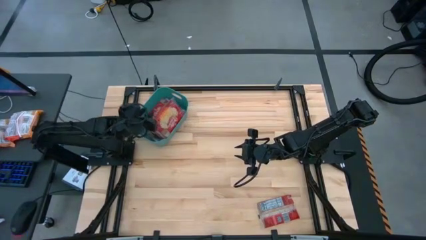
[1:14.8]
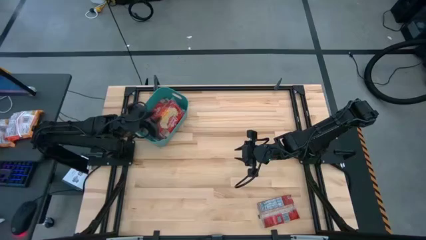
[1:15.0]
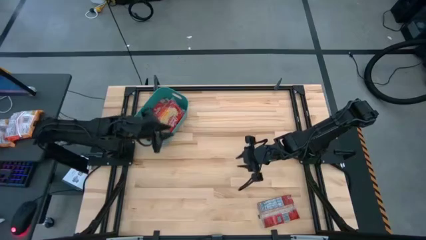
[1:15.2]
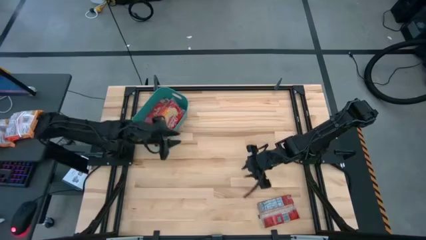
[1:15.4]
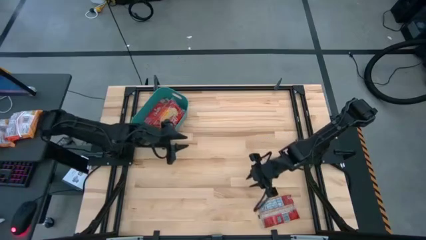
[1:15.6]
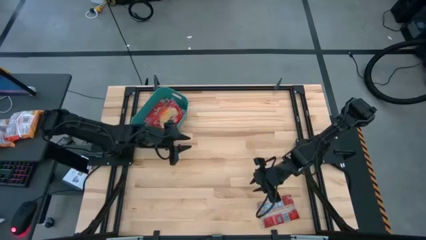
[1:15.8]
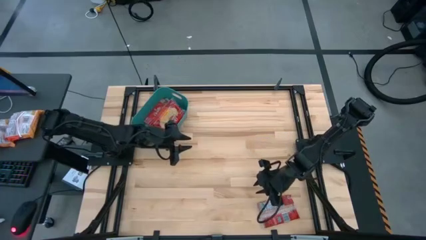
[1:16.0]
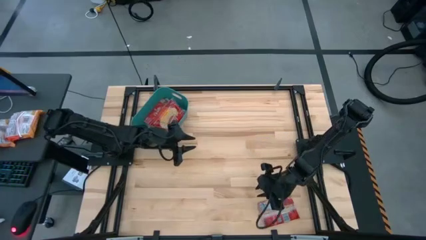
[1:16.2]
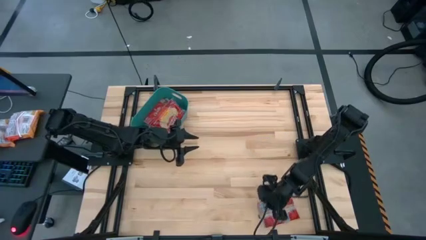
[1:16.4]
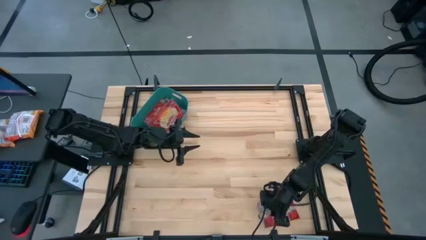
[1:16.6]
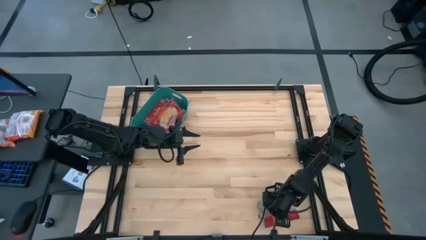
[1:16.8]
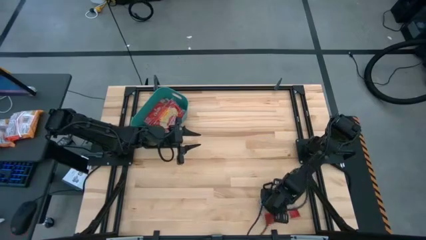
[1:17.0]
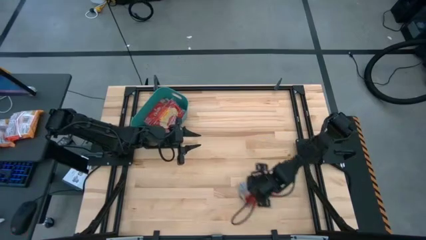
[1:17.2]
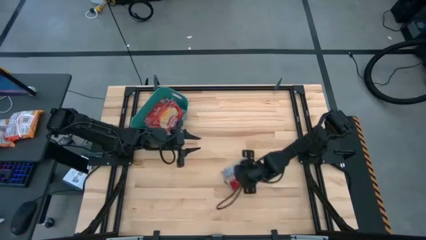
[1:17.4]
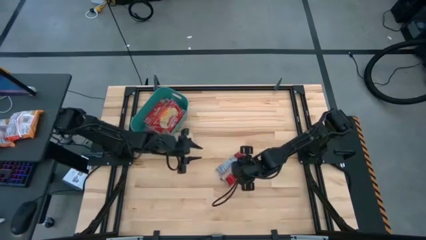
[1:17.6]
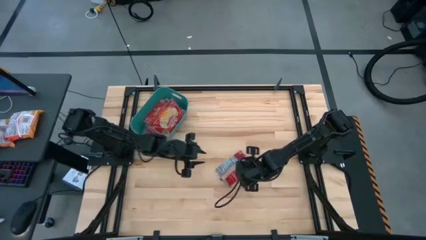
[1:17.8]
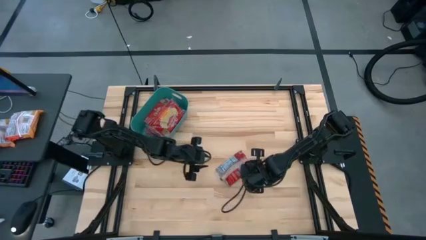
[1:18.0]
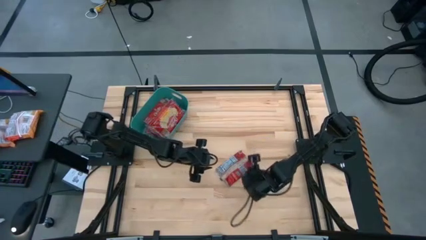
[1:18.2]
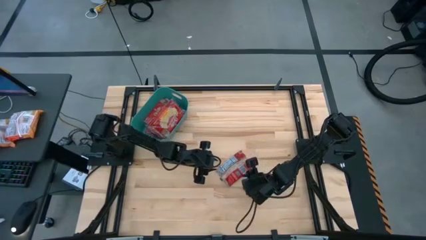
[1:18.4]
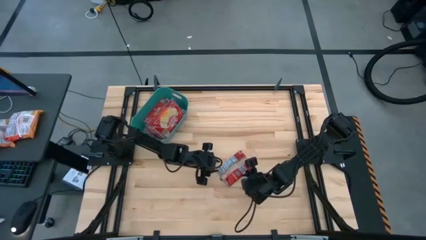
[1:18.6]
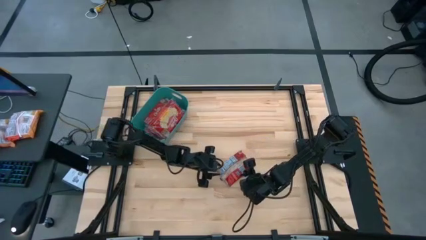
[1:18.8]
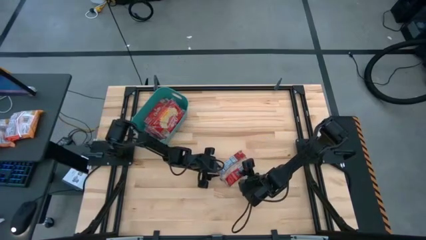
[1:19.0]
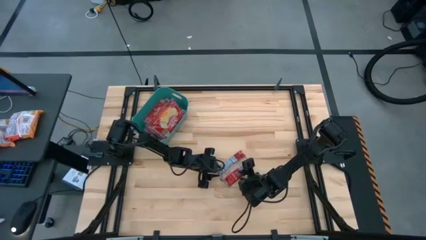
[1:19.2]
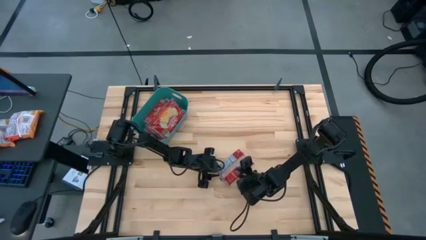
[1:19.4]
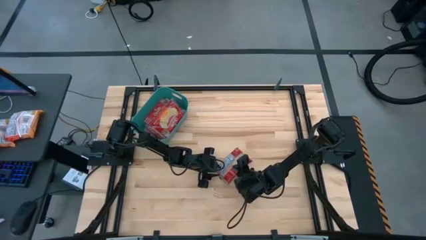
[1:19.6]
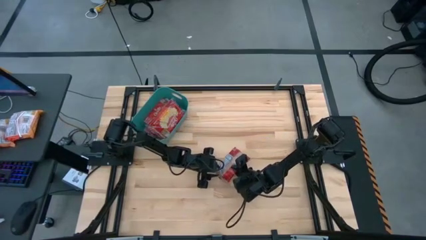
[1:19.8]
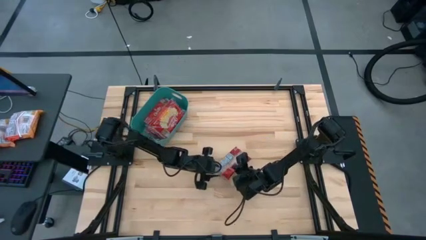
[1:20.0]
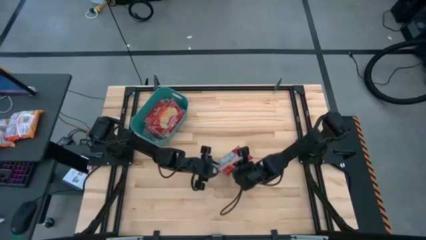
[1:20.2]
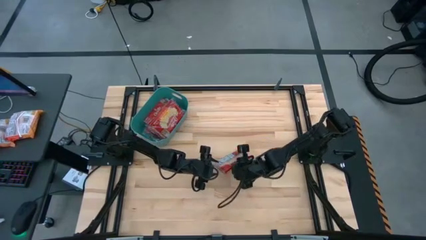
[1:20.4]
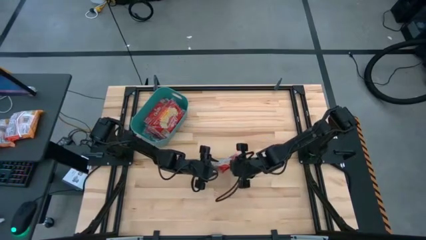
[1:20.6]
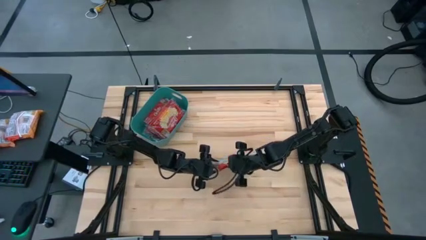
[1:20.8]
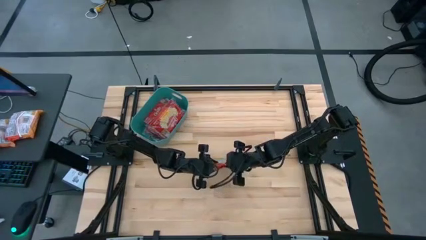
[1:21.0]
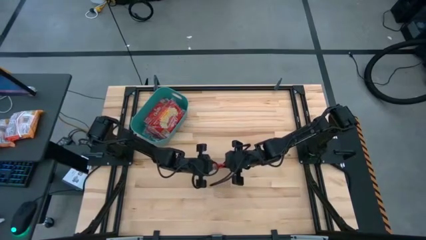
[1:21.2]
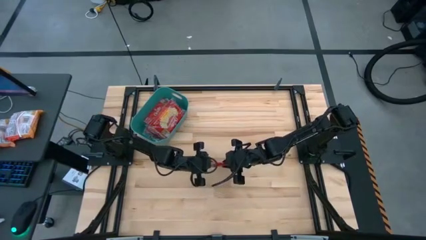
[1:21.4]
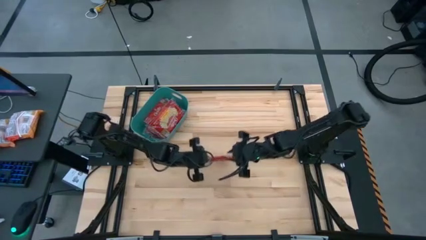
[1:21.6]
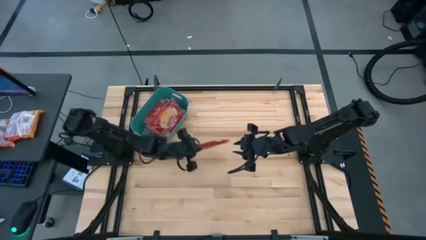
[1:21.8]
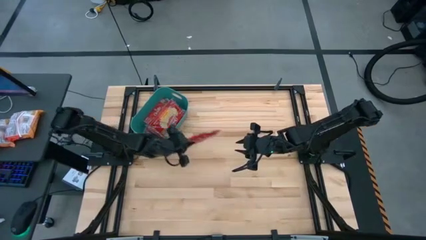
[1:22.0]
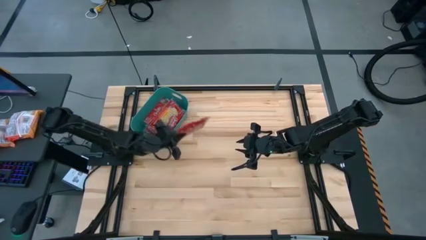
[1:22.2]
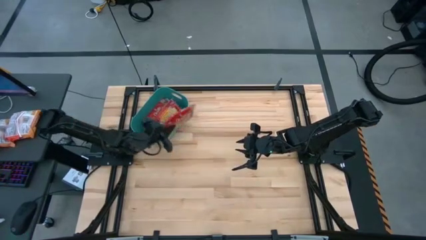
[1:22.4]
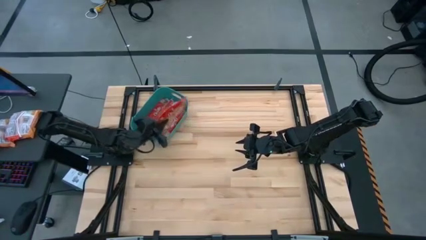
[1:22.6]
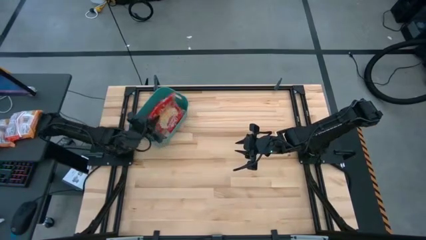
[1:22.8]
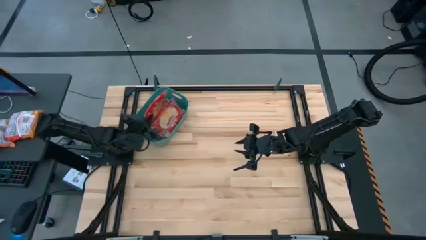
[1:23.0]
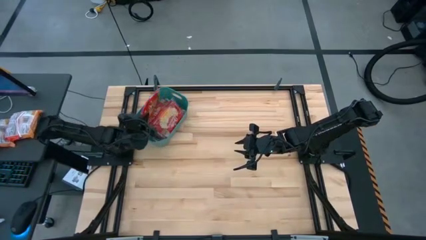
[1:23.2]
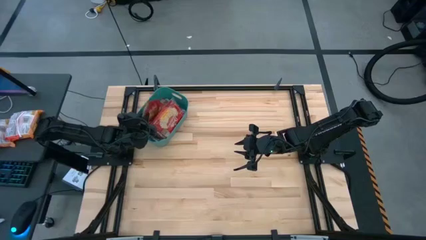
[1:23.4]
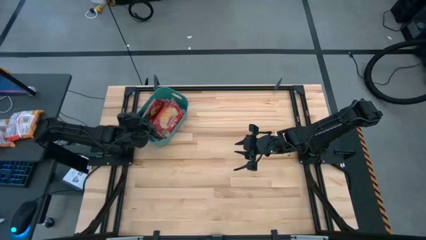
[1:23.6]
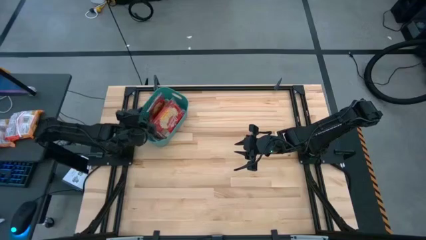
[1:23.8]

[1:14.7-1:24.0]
Task: Sort popcorn bags into baskets
Put the red popcorn bag into the green bin

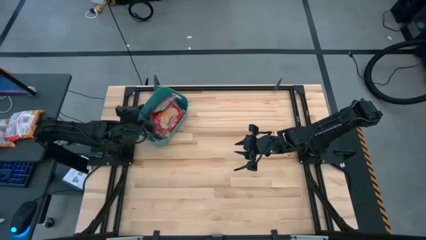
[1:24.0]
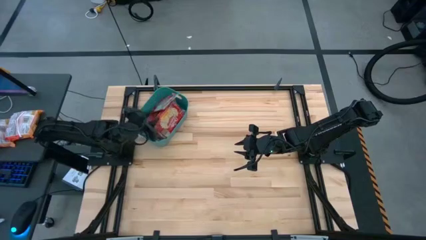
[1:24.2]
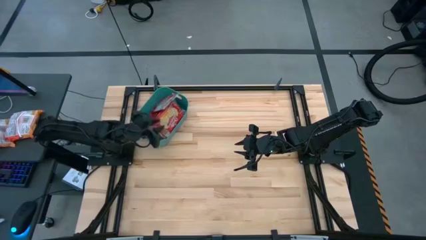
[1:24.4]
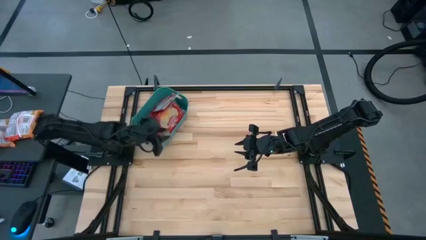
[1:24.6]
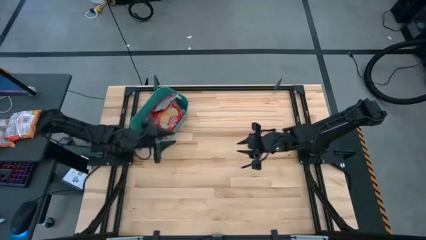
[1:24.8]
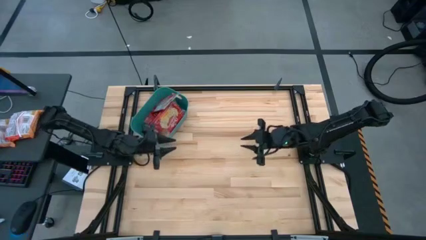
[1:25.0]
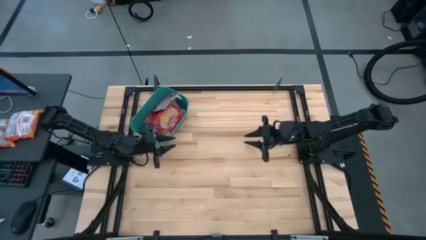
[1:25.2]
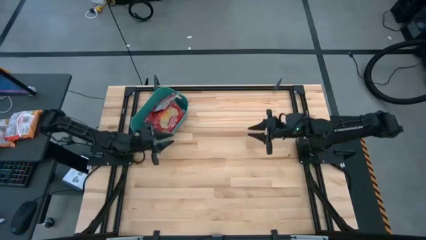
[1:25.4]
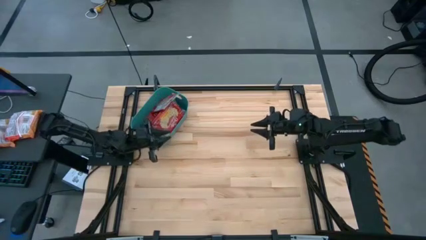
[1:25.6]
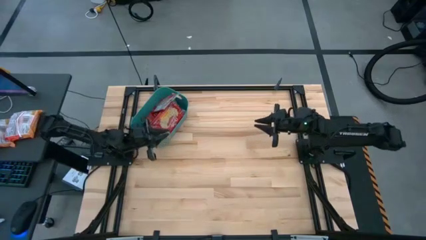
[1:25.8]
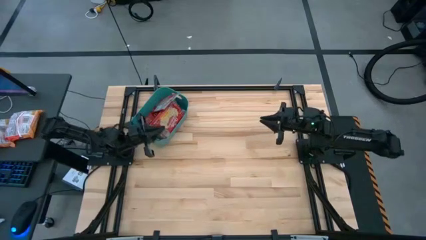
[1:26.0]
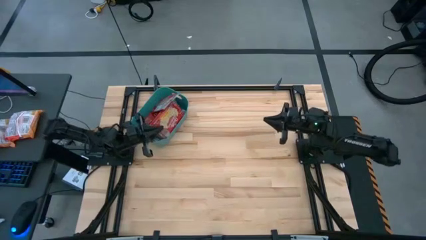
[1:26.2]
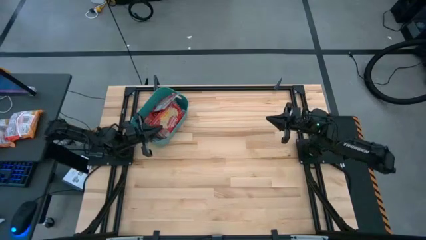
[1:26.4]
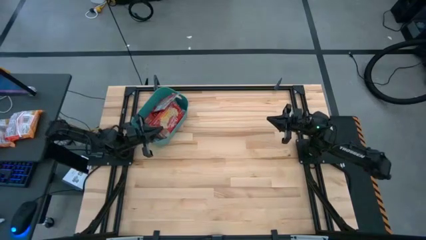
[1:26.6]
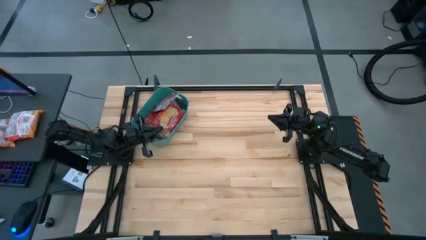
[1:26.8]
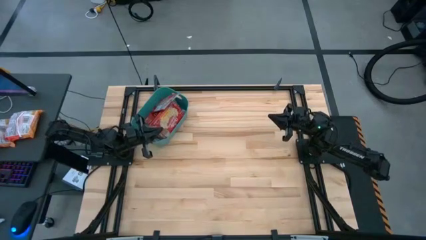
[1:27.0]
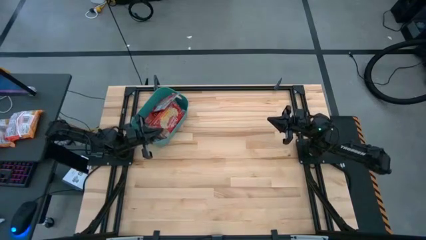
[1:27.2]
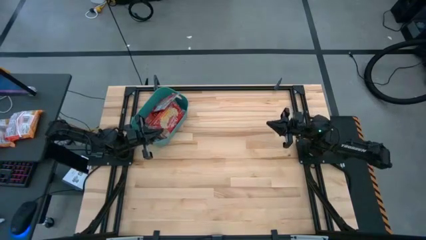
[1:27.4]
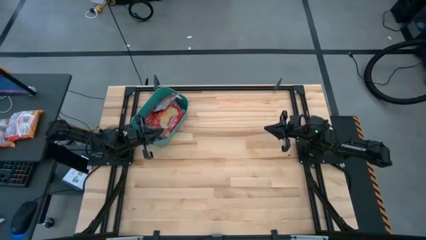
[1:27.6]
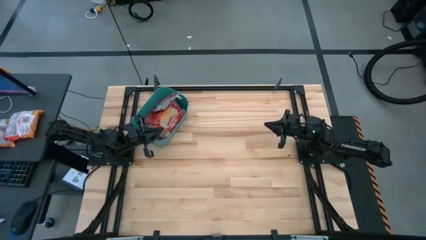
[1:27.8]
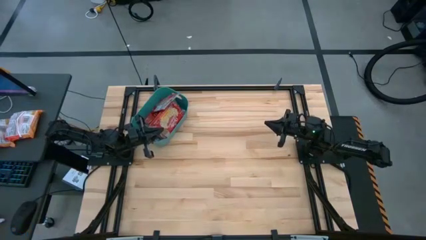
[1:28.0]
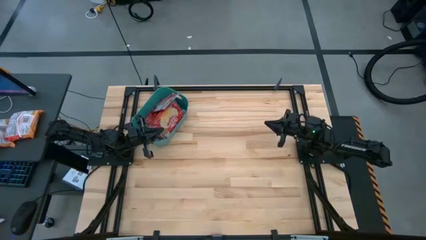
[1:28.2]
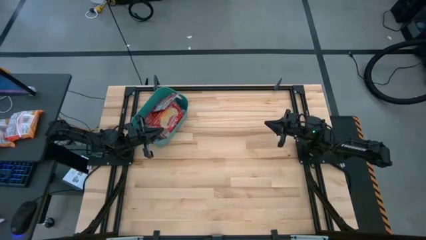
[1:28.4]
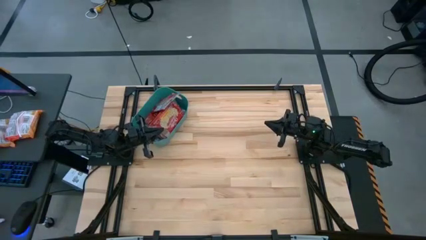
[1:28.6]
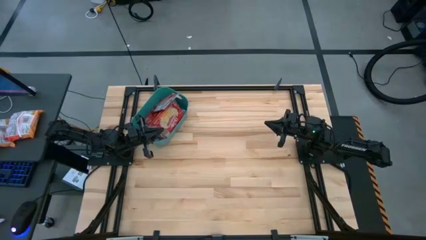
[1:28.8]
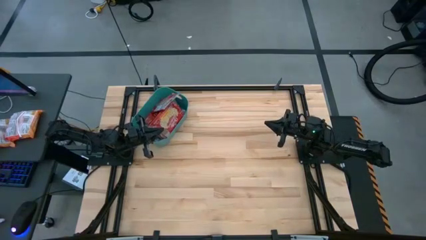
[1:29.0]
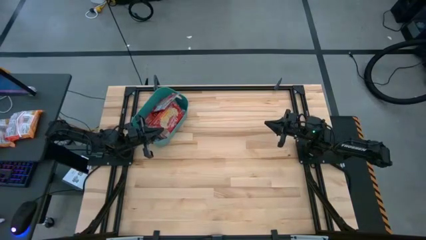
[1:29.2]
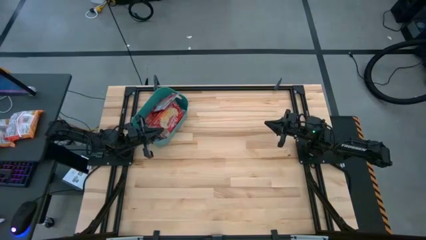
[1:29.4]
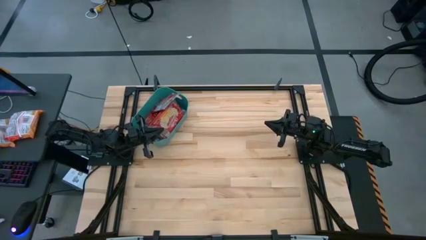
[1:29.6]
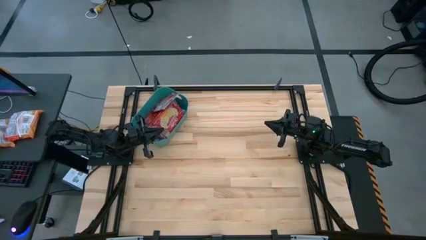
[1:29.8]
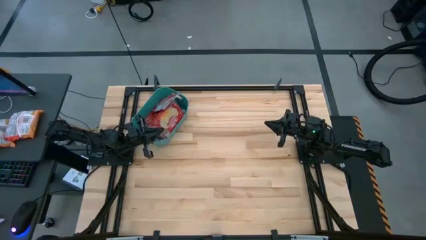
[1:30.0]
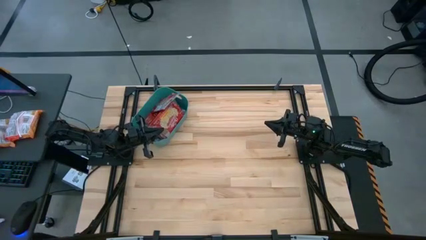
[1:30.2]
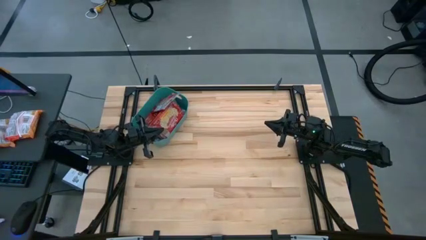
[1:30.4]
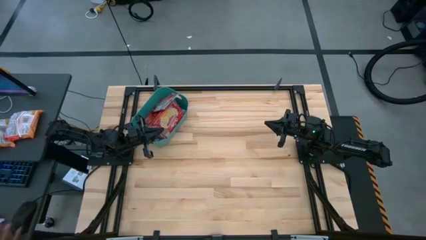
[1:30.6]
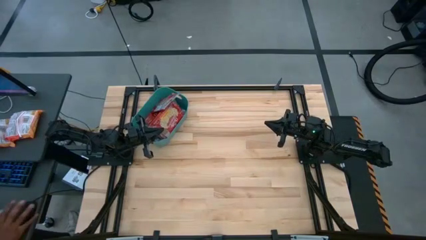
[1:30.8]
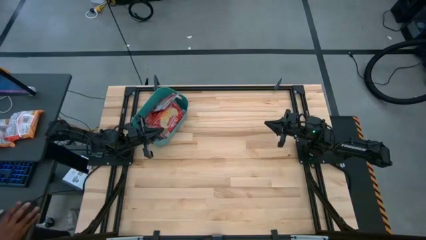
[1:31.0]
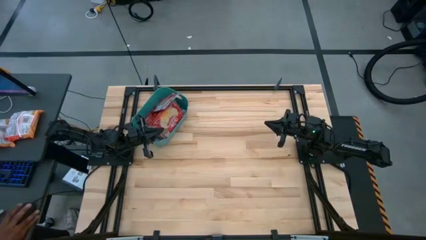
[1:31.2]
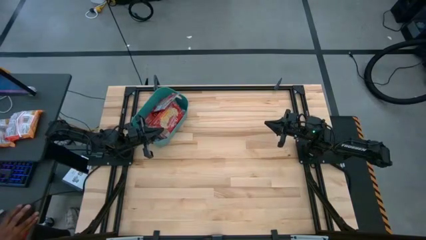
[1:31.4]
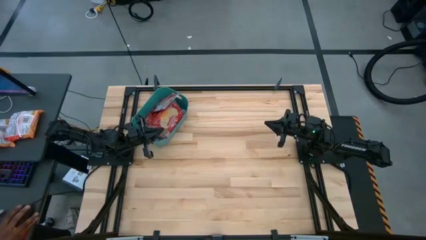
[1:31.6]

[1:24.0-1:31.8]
Return to Home Position
